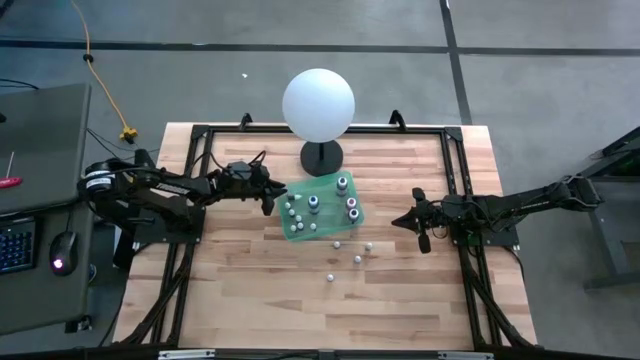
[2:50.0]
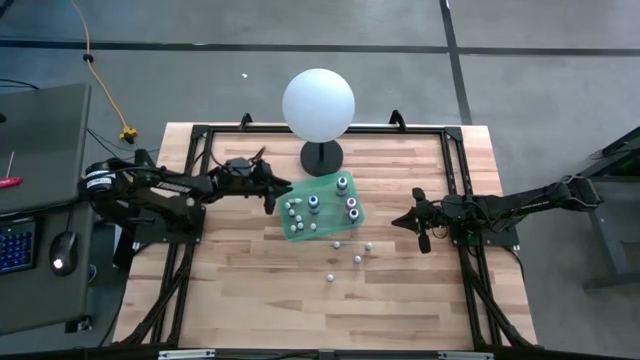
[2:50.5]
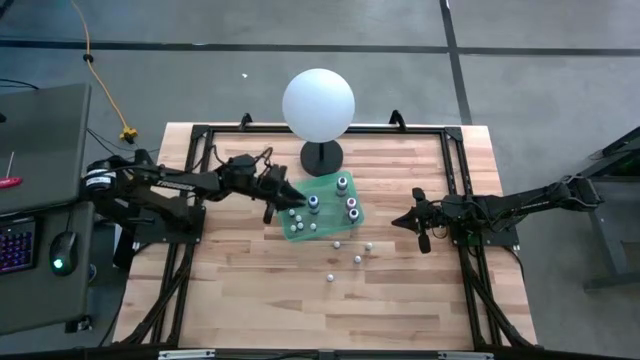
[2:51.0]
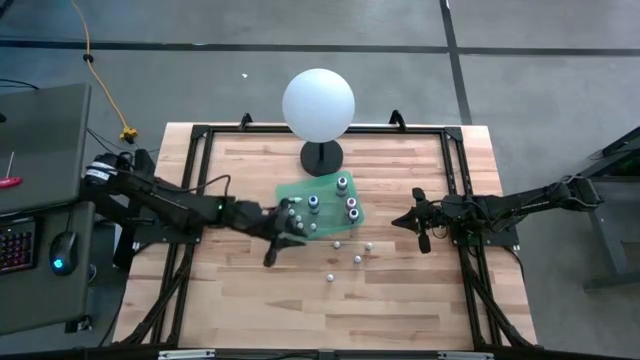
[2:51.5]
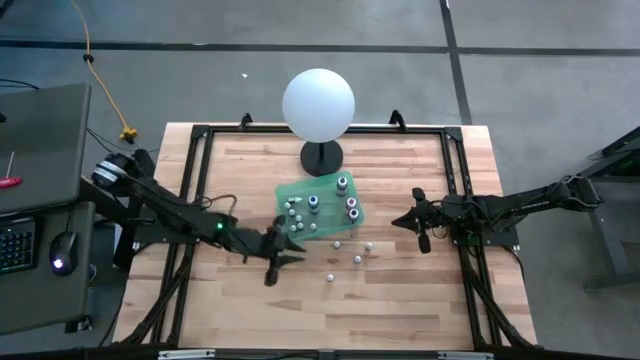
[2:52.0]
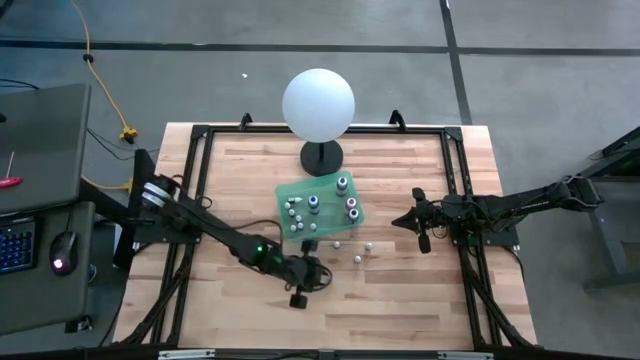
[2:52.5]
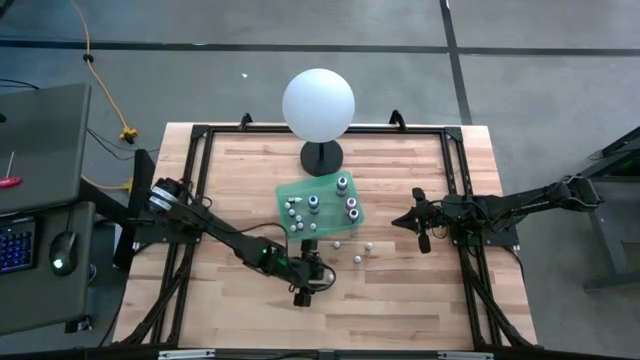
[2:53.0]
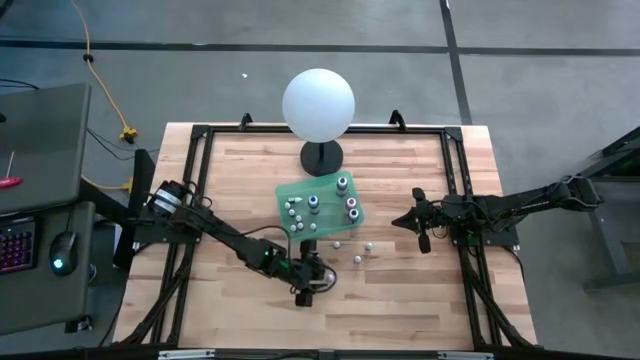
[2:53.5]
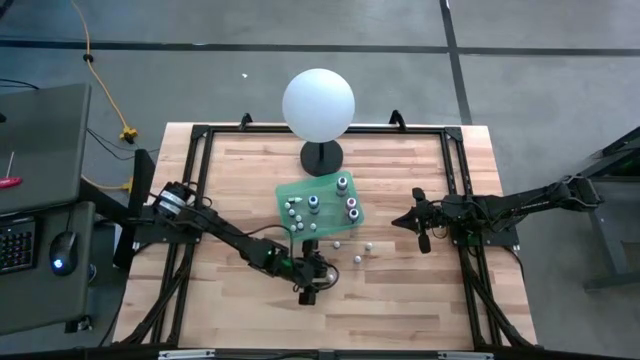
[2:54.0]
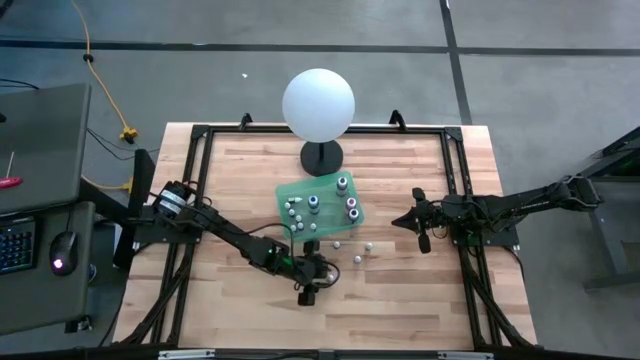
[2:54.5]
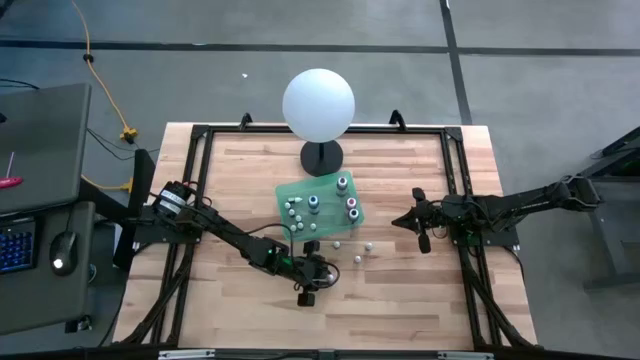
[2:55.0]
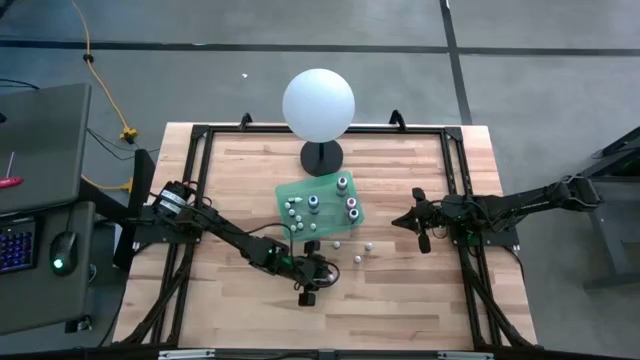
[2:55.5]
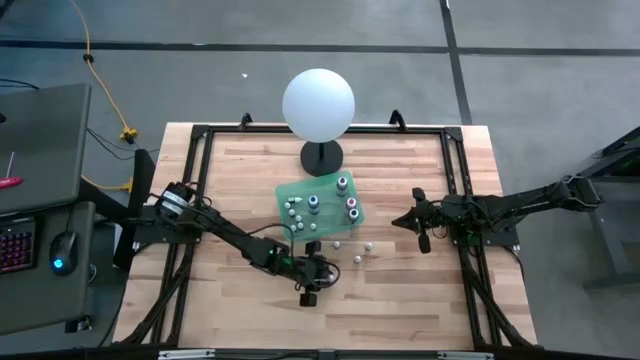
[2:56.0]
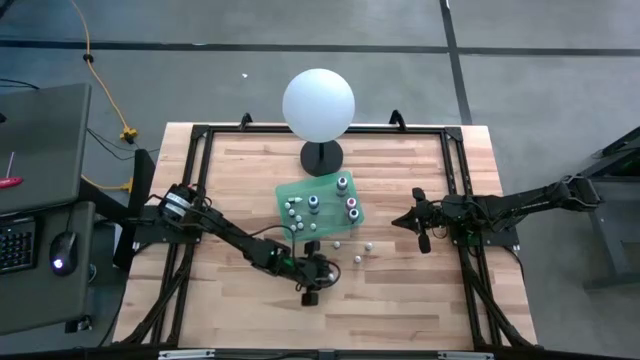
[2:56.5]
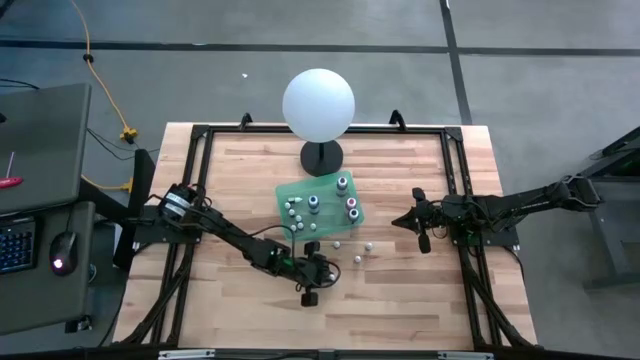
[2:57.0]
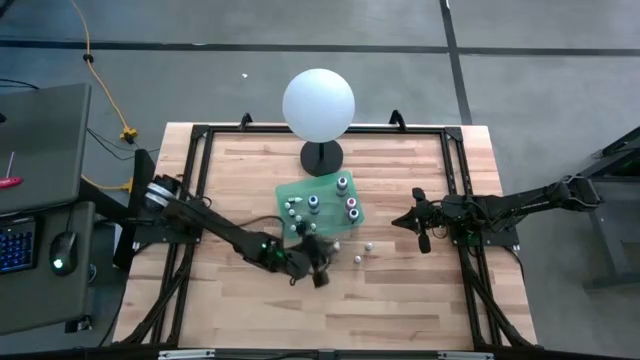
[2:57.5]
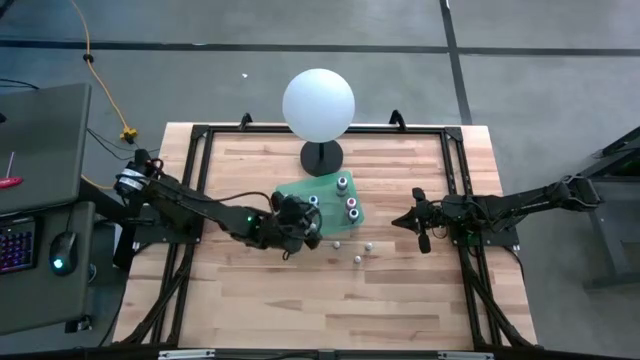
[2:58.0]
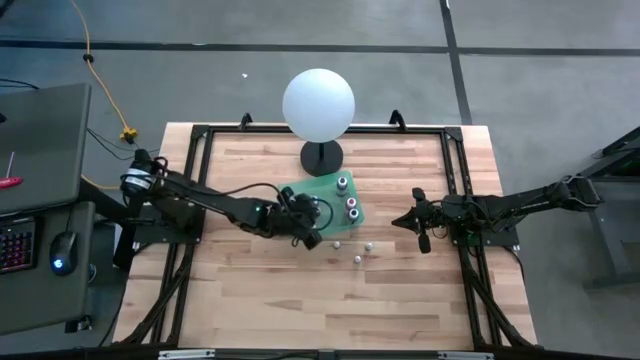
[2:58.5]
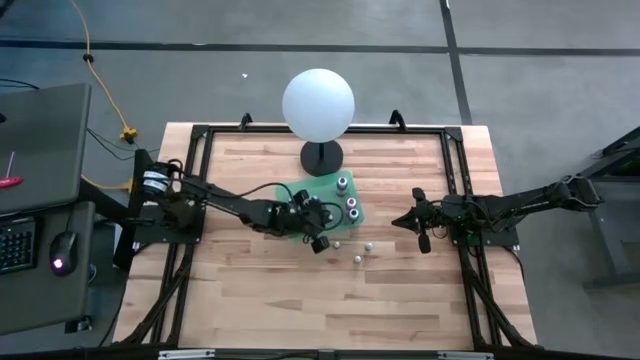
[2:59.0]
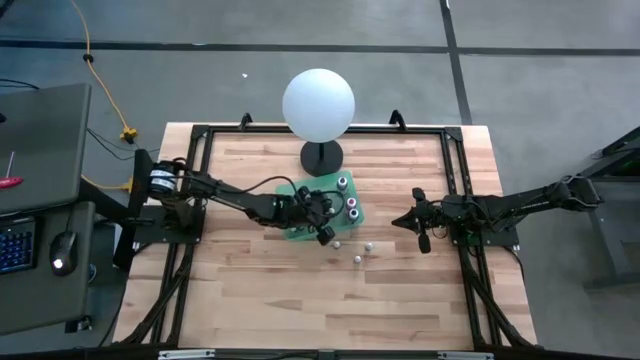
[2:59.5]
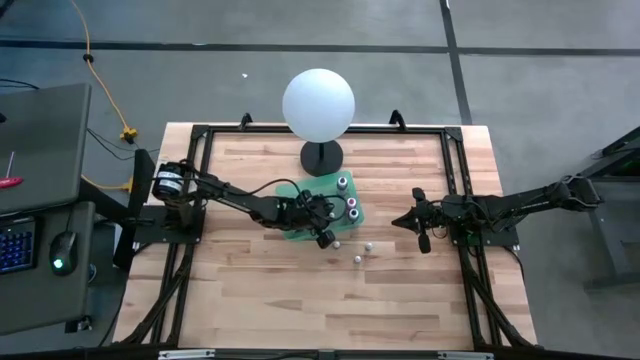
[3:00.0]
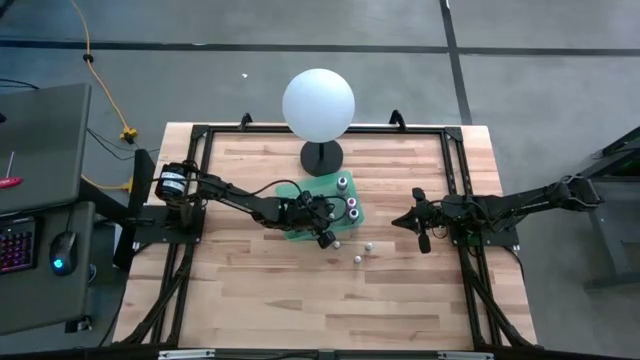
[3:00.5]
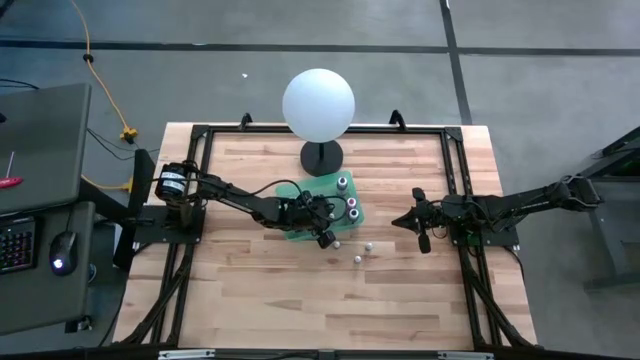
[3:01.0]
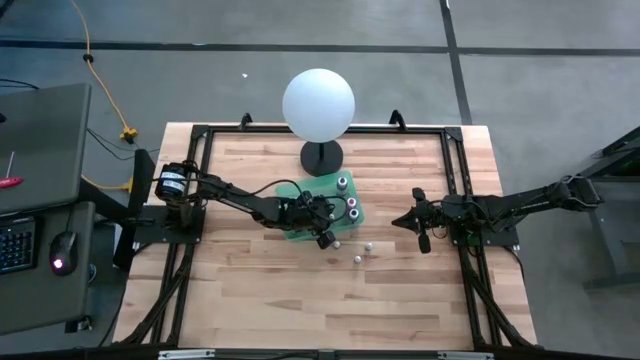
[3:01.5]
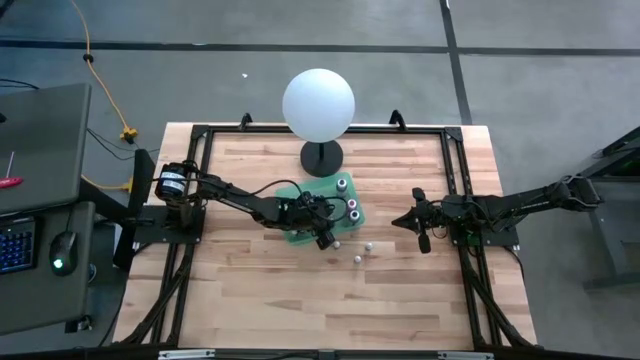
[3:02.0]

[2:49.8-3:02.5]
Task: Pick & Place food coloring
Put the small purple food coloring bottle into the bin

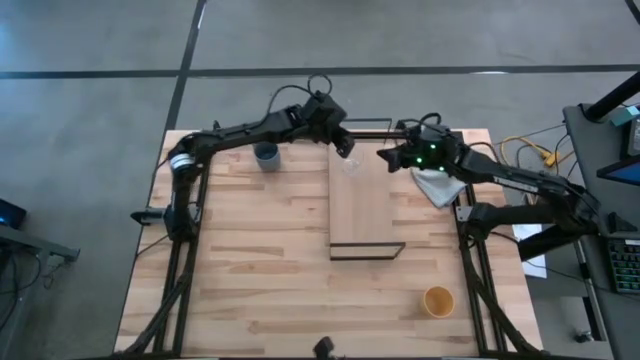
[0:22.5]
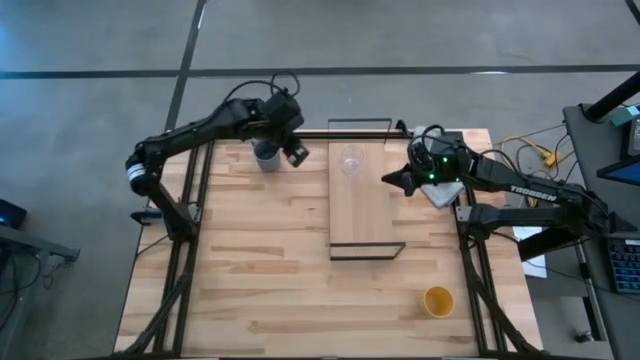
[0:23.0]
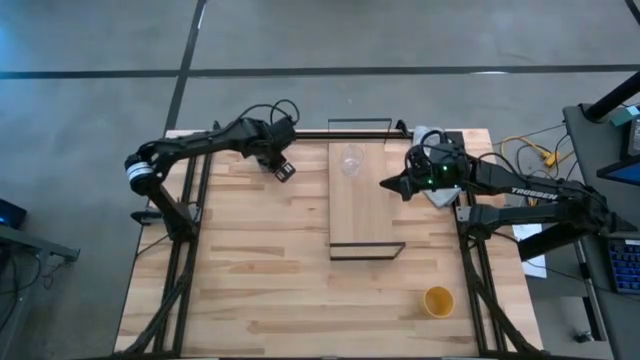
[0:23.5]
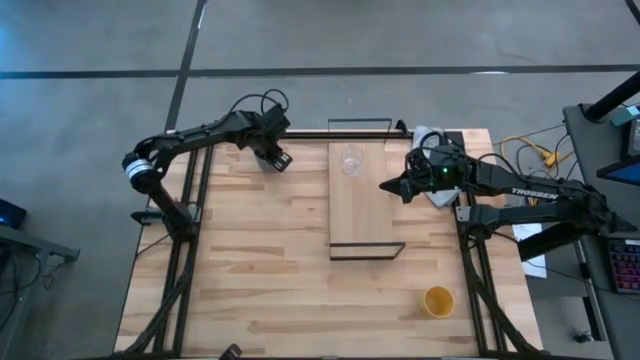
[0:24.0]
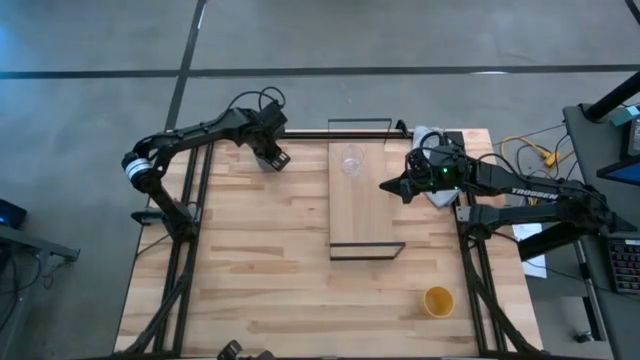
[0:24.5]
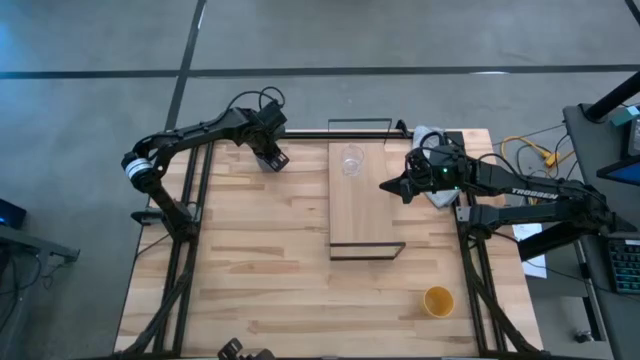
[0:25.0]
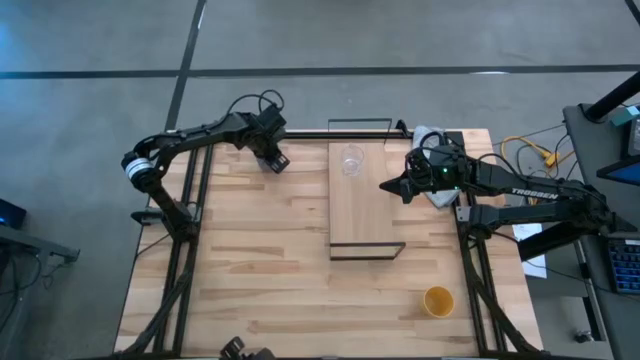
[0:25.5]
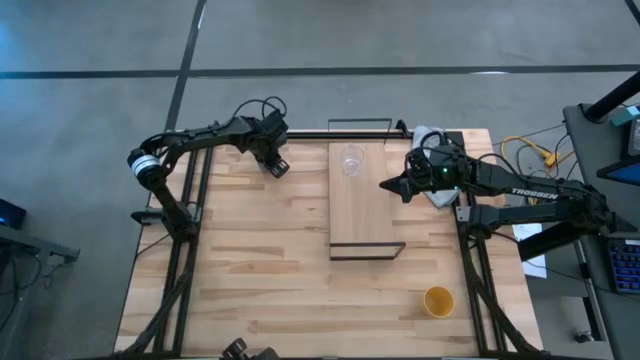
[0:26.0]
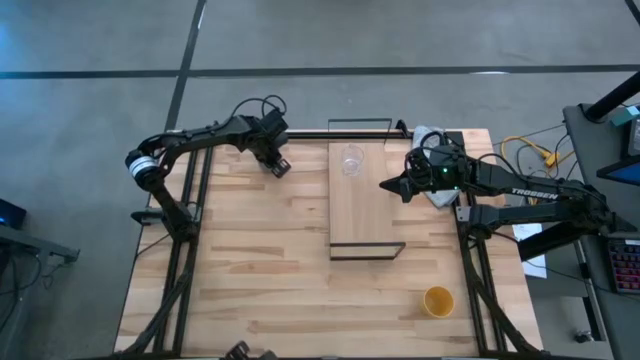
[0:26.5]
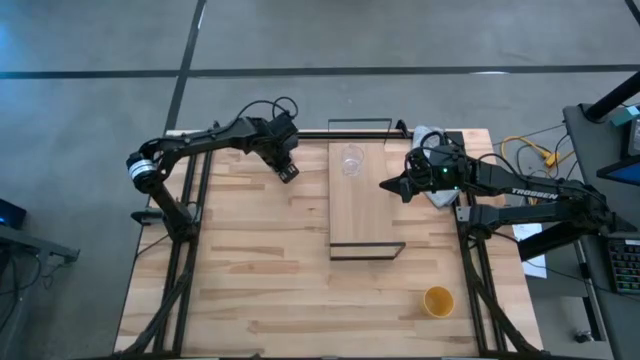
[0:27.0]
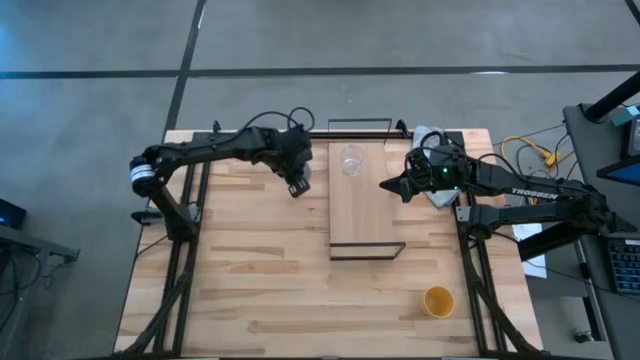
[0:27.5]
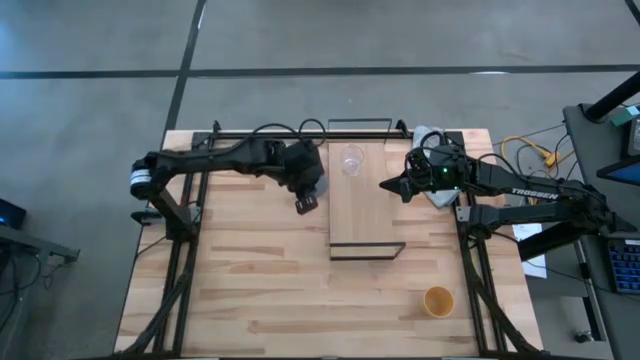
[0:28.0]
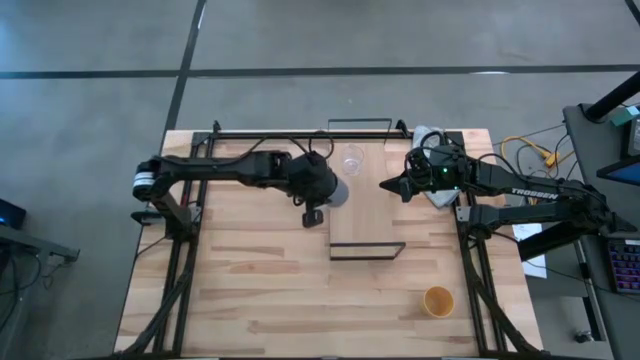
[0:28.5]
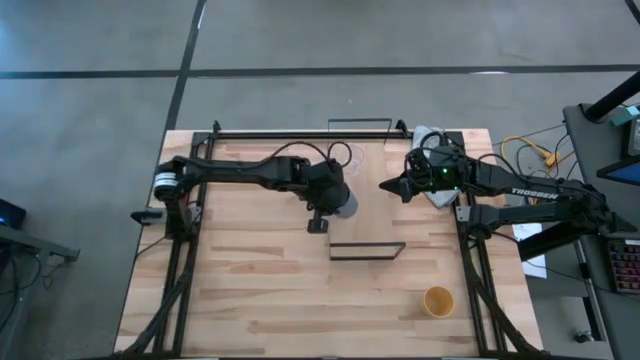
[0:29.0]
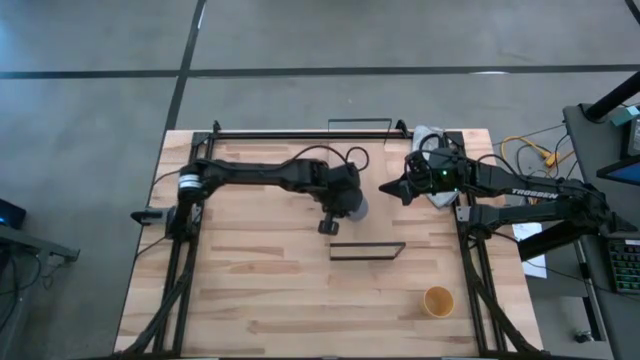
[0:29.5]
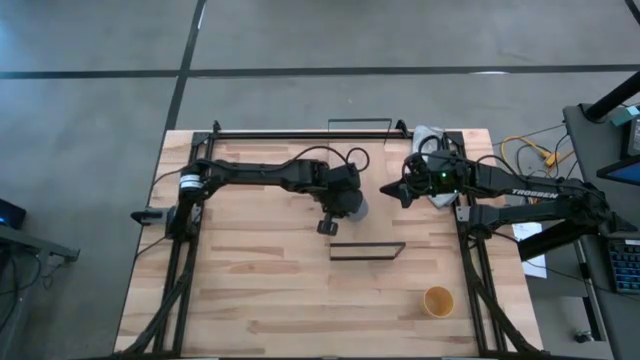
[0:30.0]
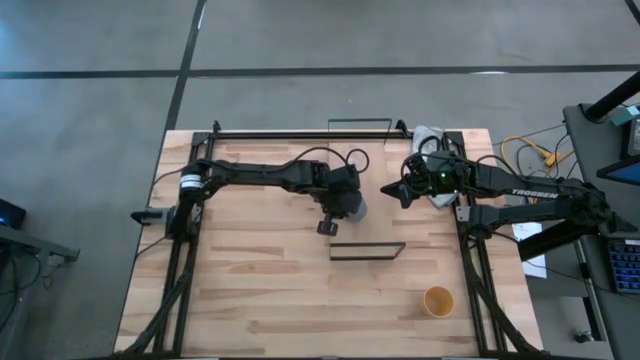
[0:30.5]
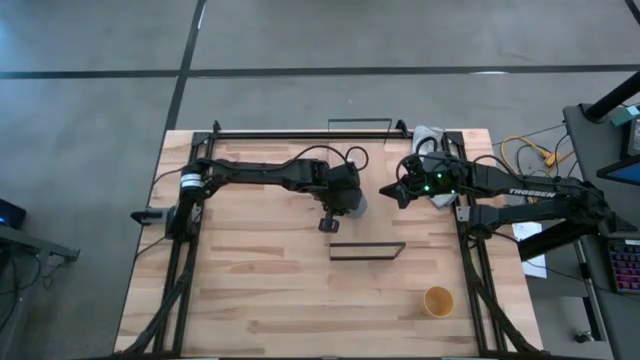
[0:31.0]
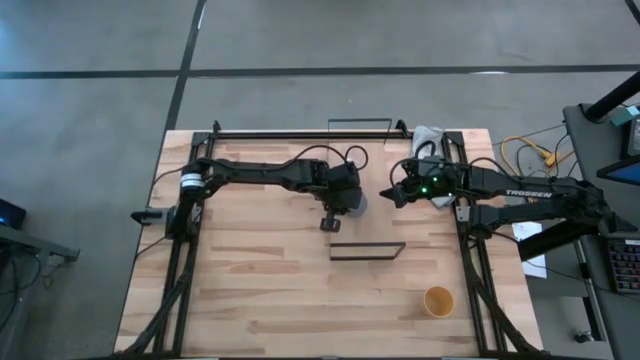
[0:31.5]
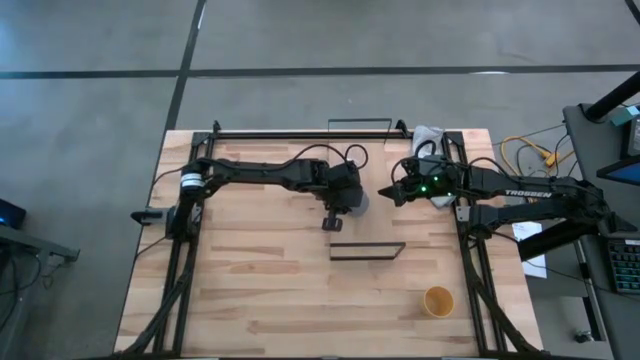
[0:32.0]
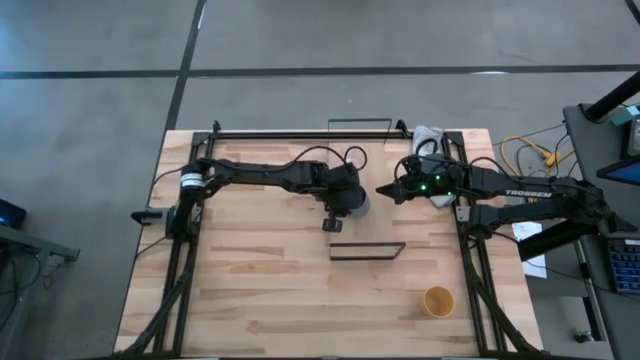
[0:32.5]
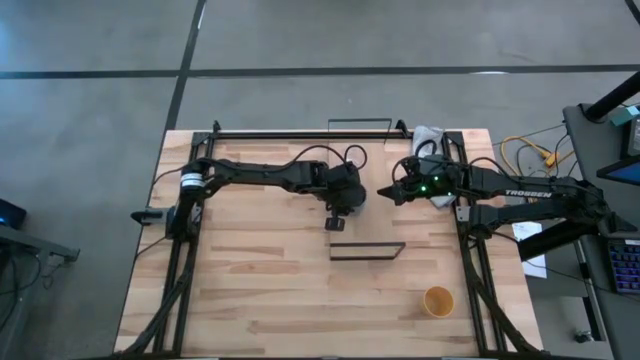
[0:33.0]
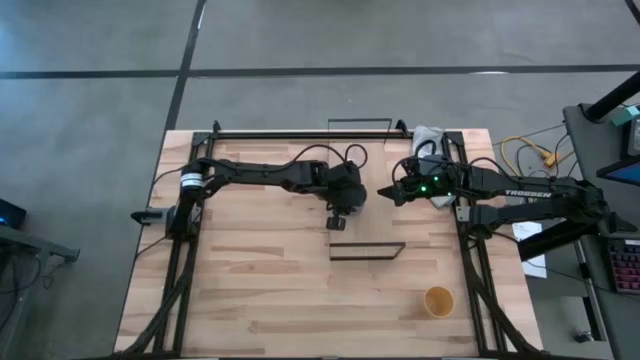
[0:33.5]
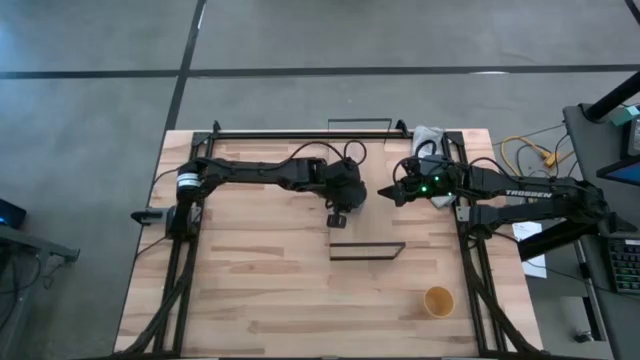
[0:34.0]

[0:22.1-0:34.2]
Task: Stack small to large cups/mugs on shelf
Put the light blue mug on the shelf
